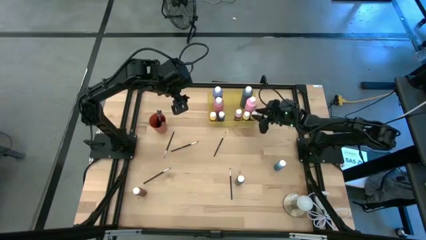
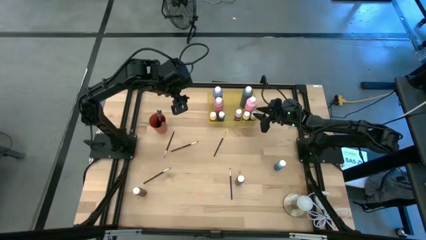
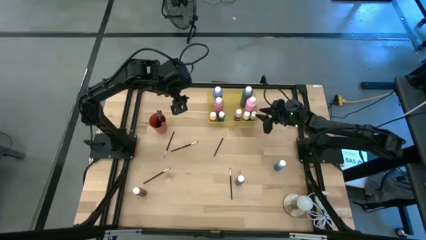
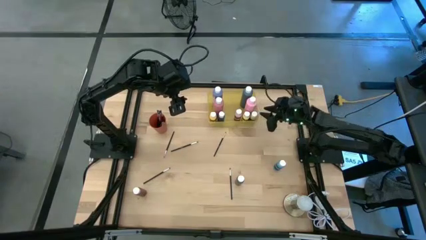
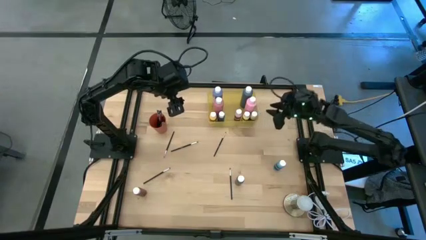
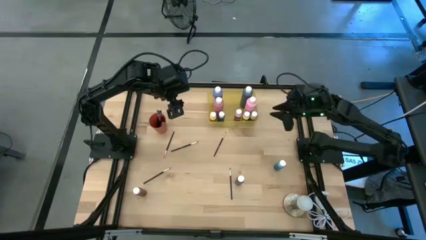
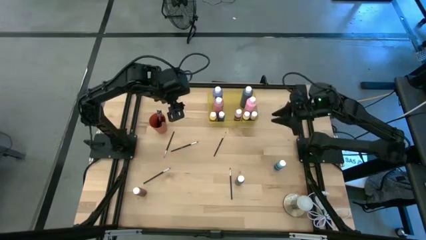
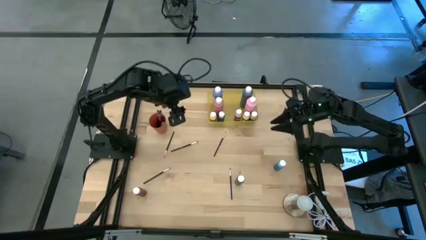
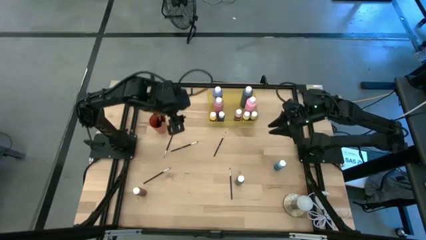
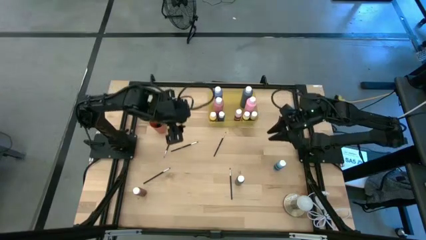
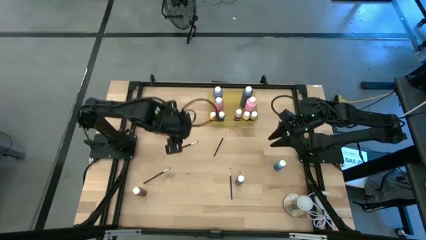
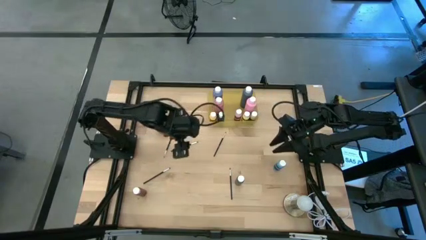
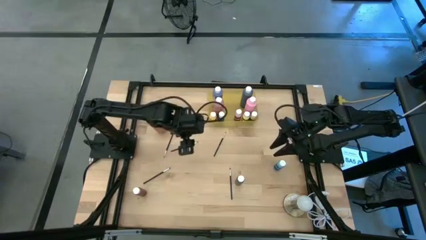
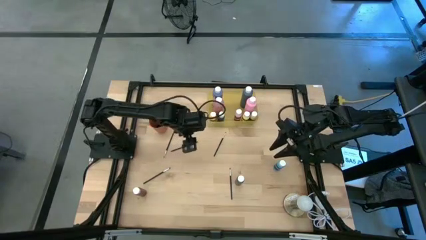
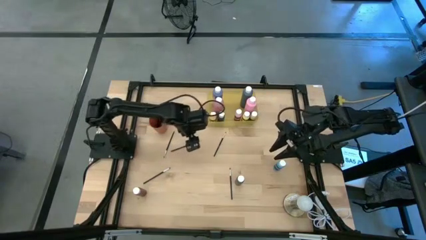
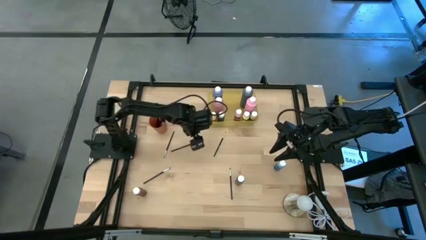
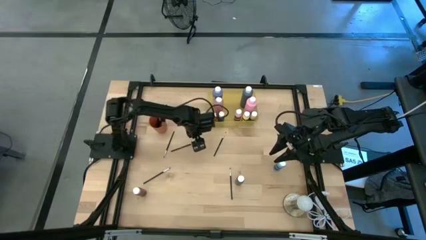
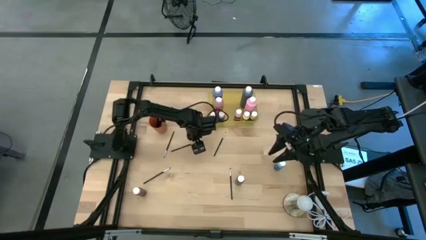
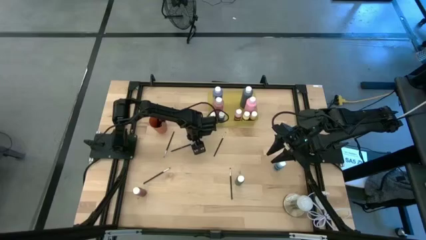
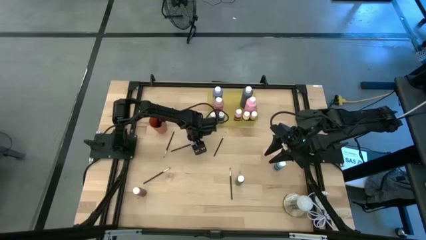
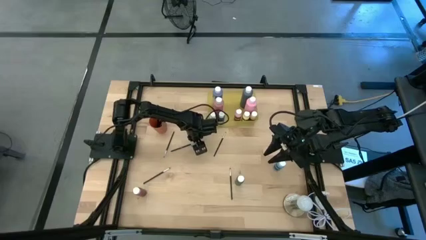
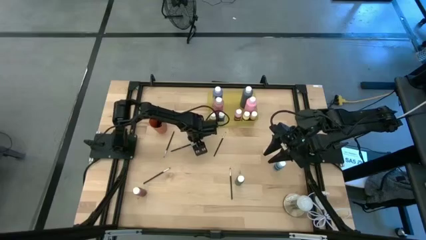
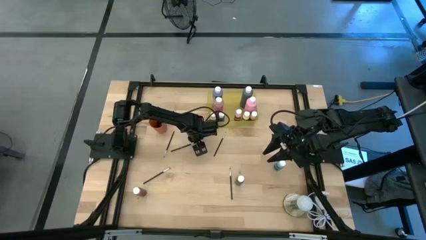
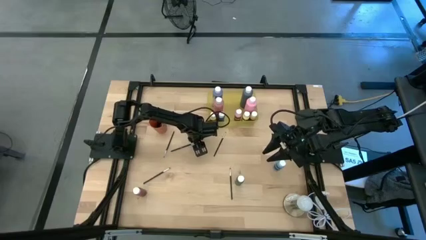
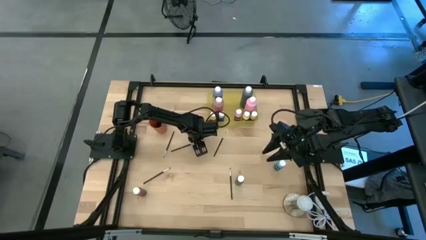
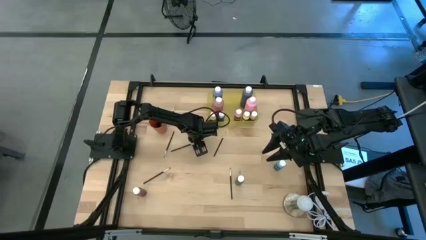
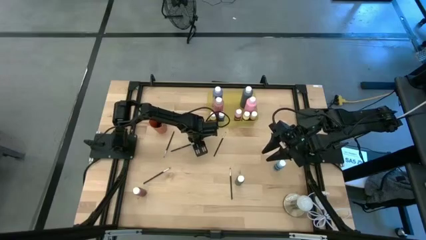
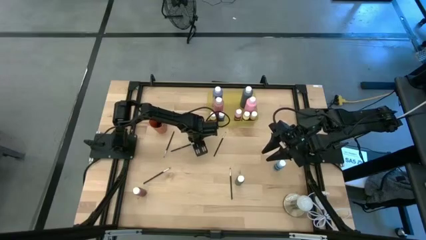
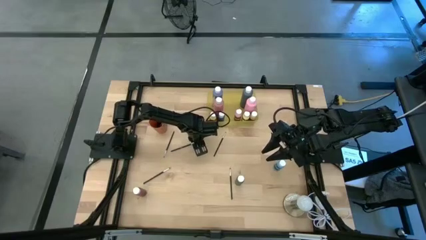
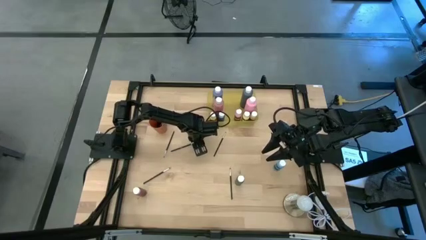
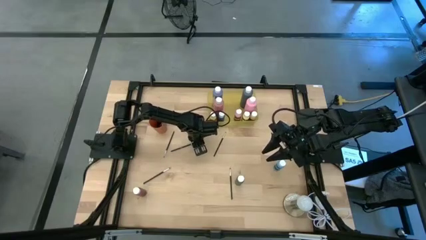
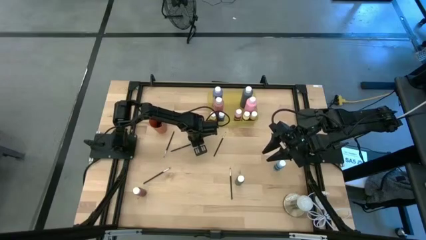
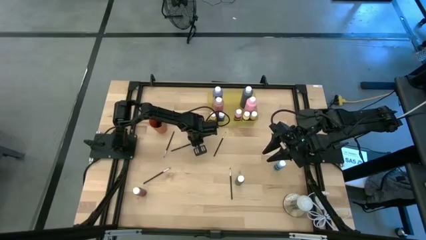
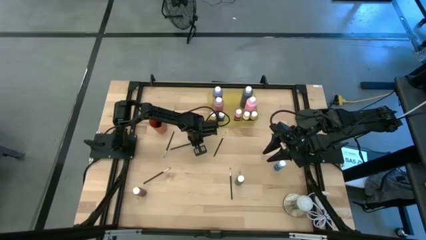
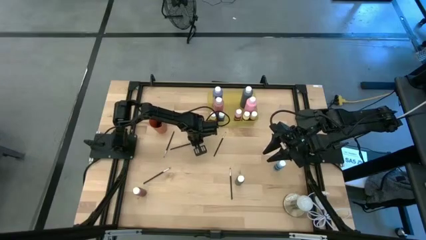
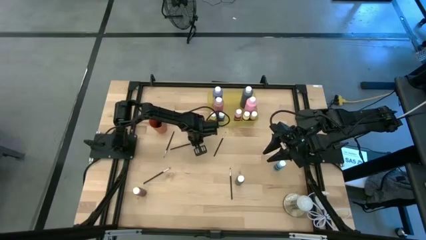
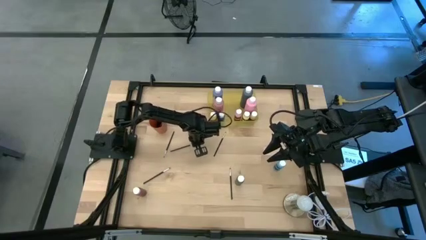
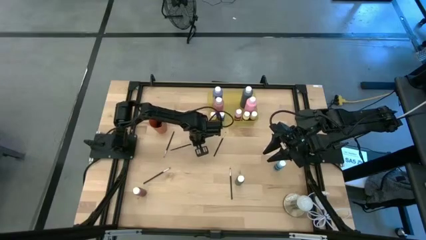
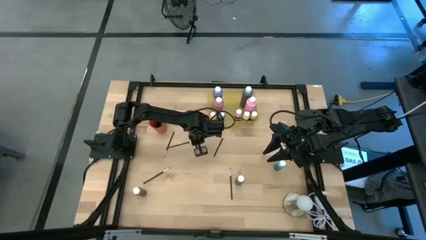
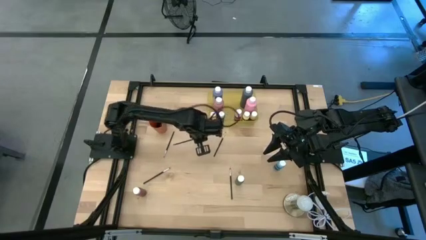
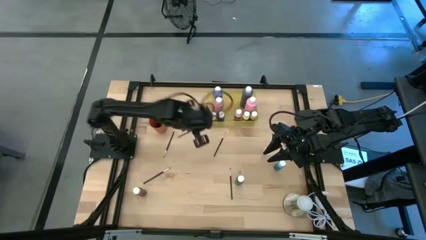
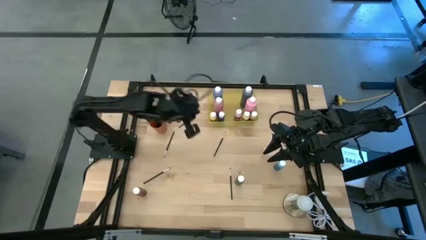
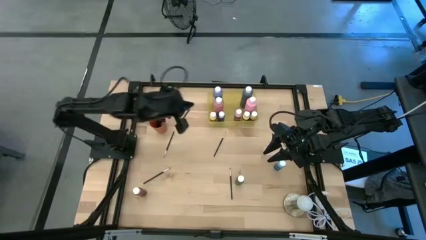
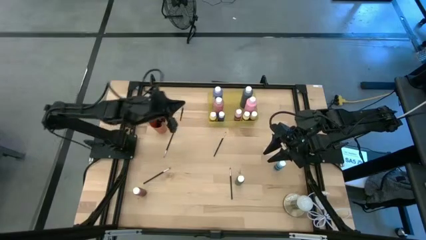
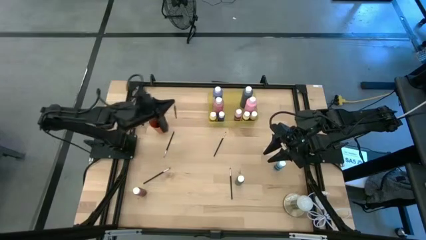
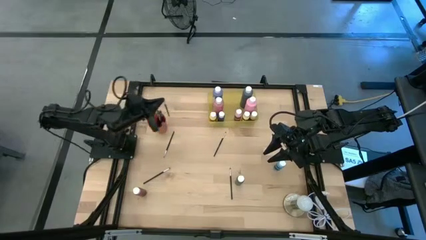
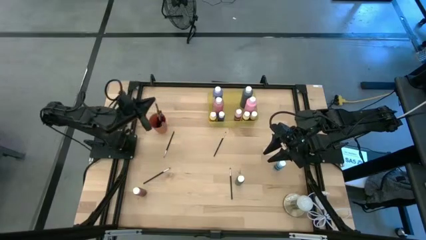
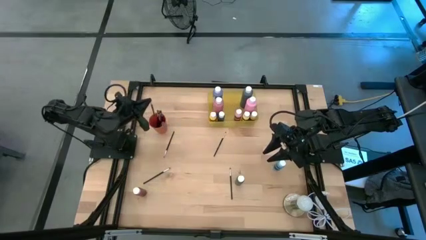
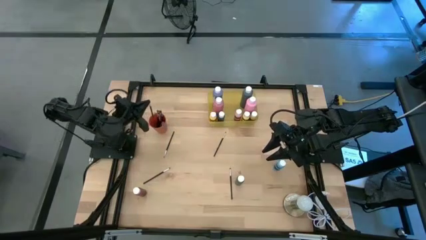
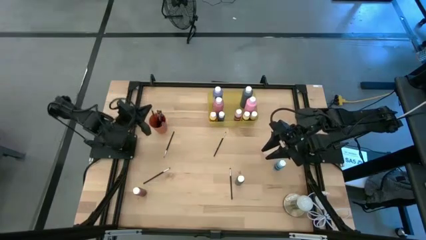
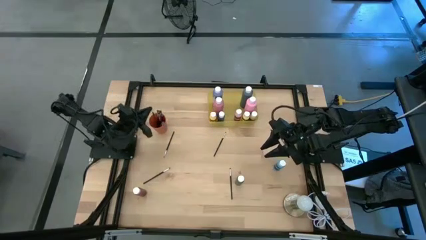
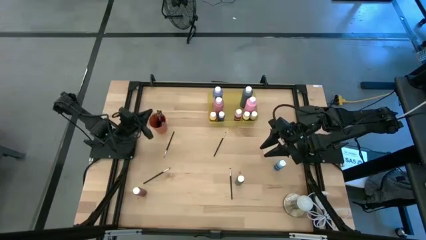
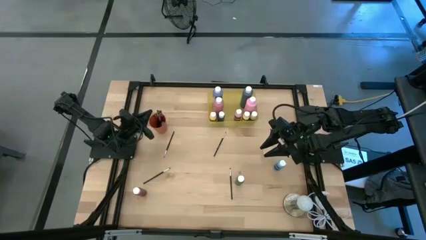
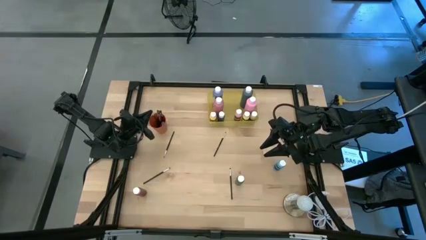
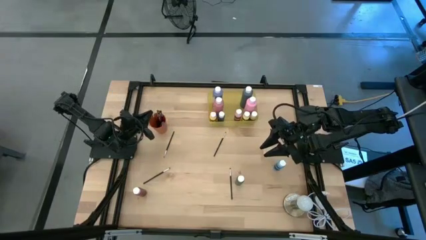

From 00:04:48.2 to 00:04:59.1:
Task: Pick & Place Paint Supplies
Put the silver paint brush into the orange cup

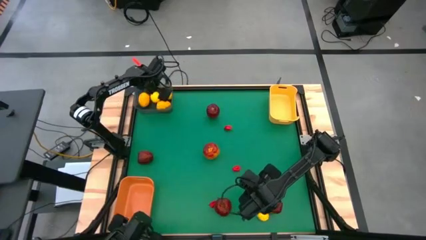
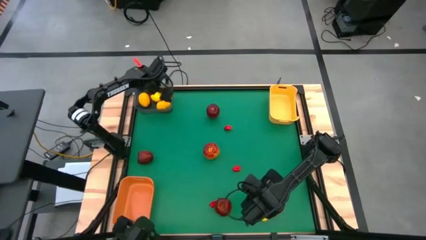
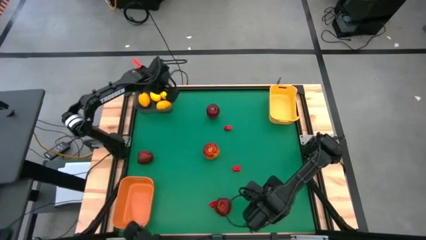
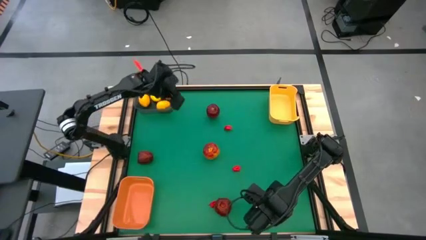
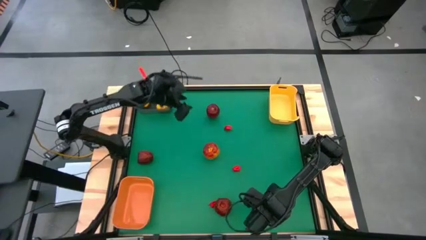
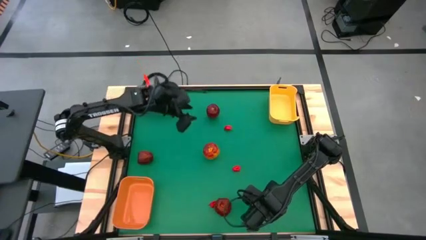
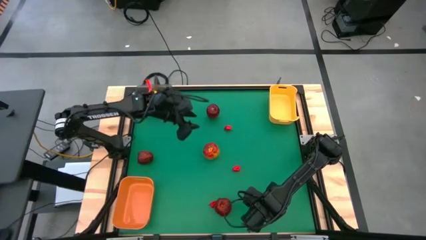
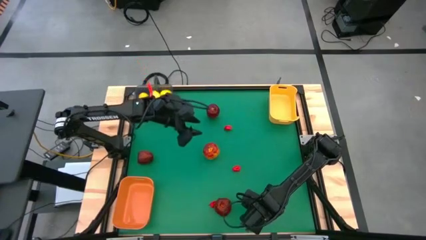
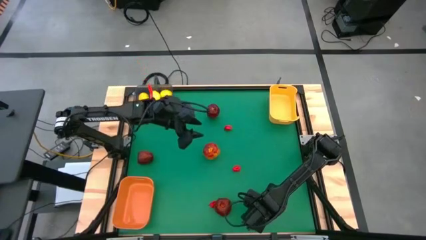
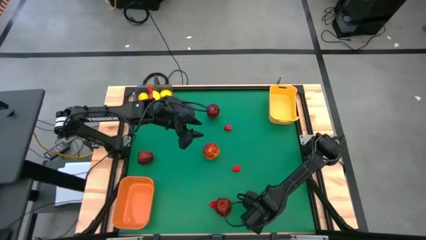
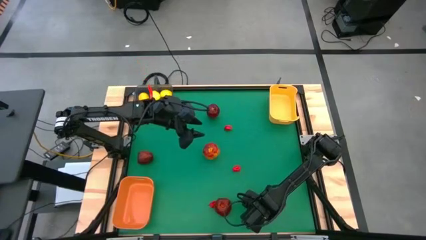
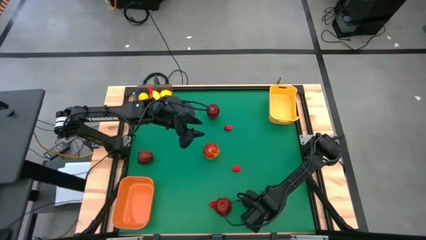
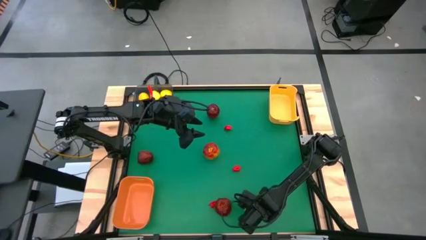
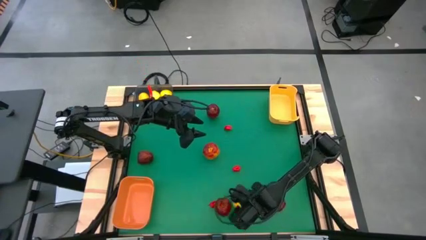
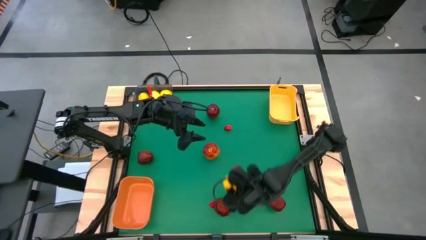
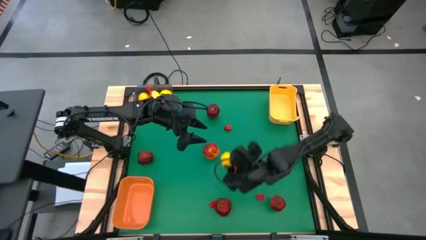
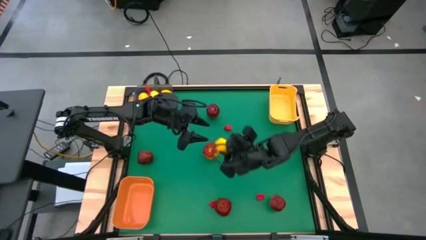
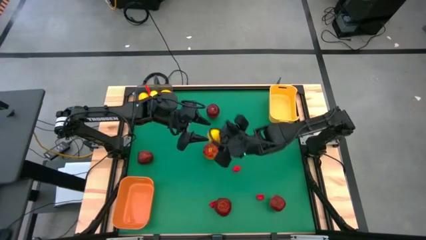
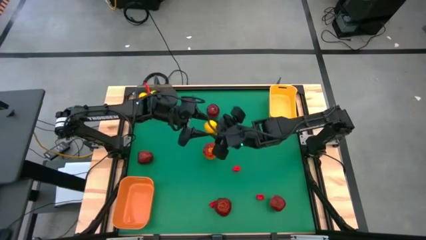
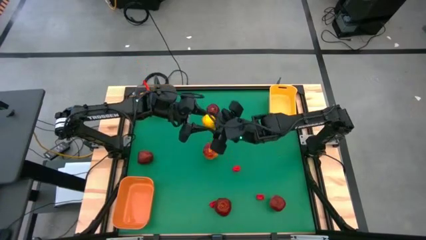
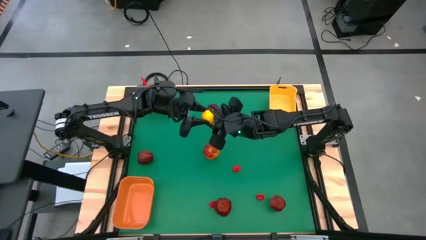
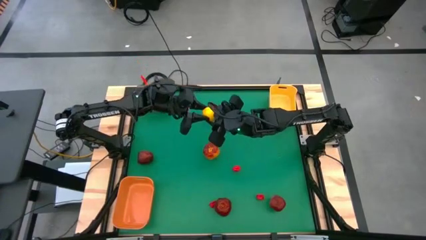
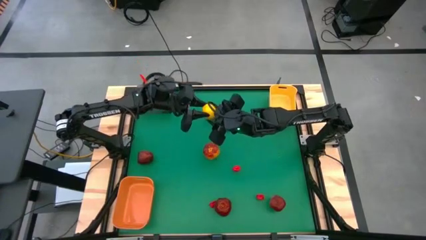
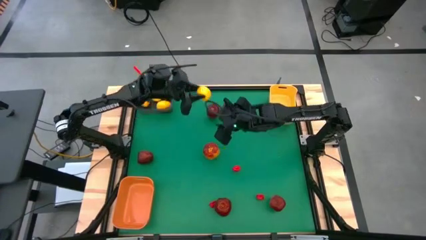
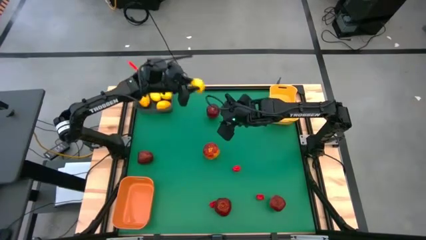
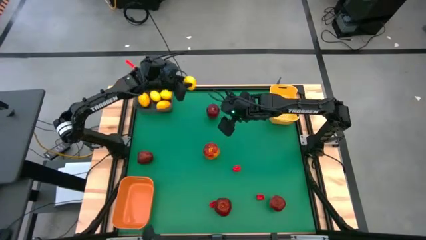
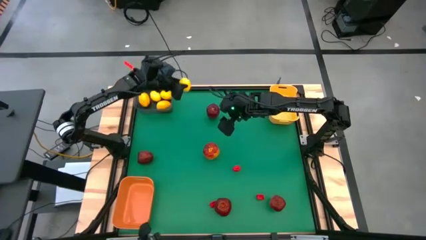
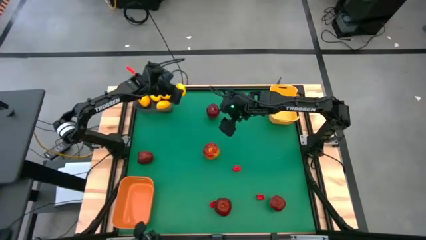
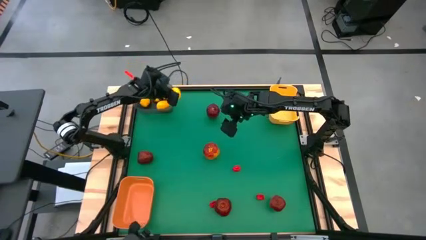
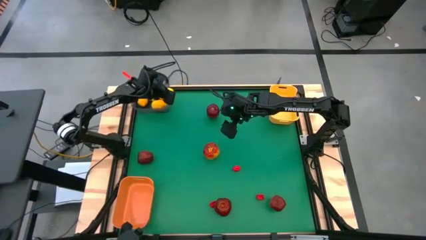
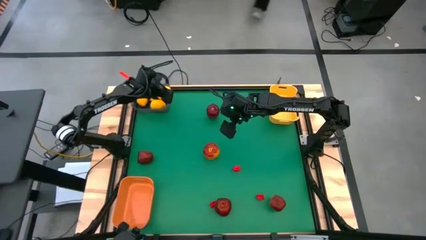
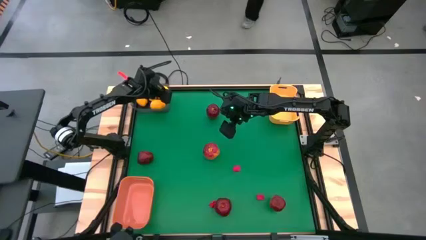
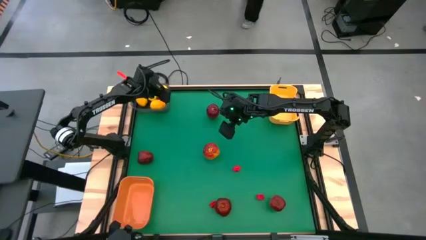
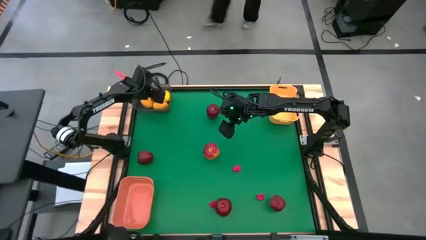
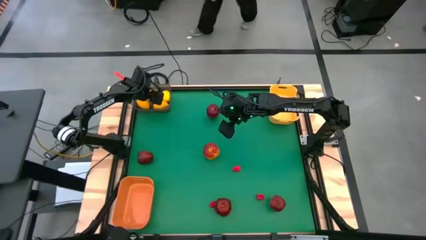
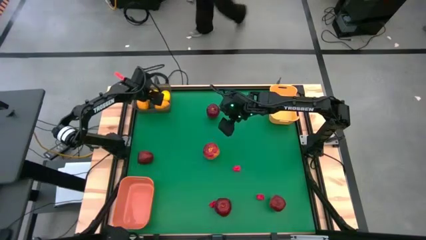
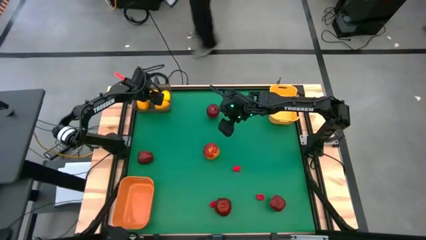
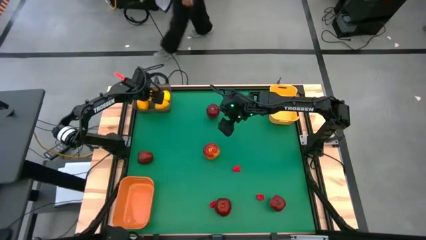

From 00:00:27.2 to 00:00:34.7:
Task: Sort produce into baskets
Put the lemon into the gray transparent bin
